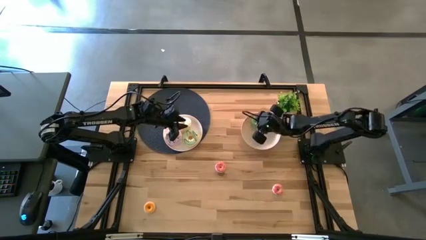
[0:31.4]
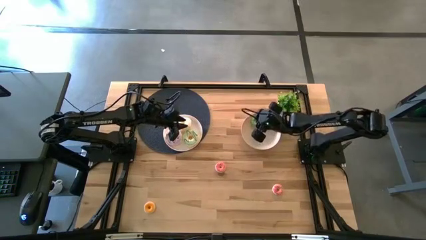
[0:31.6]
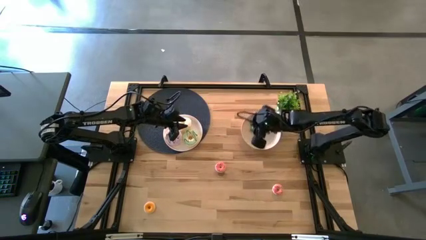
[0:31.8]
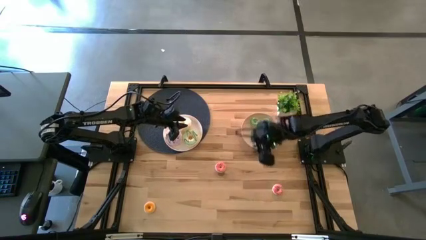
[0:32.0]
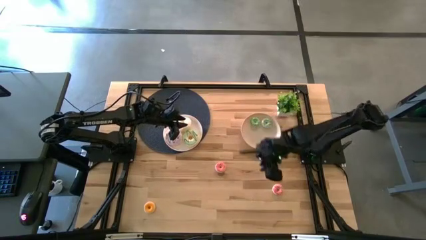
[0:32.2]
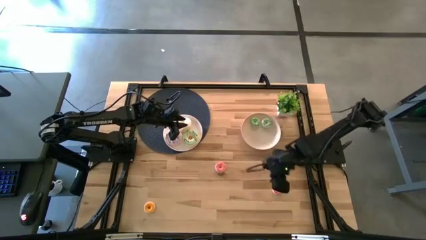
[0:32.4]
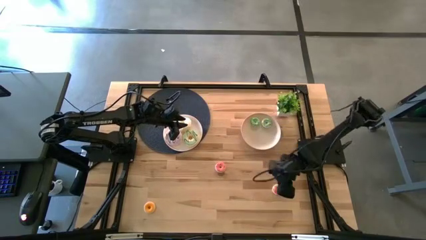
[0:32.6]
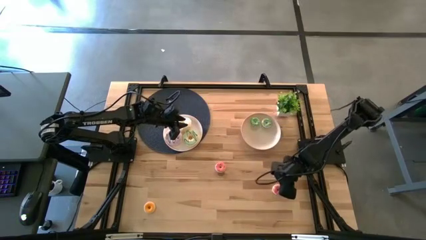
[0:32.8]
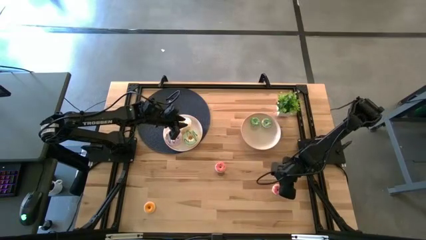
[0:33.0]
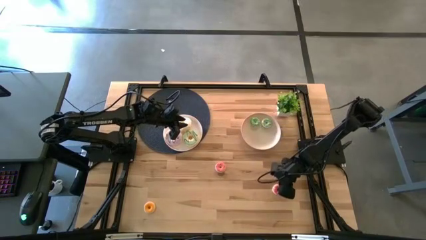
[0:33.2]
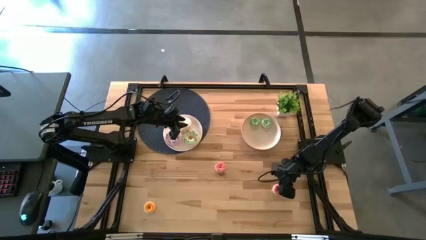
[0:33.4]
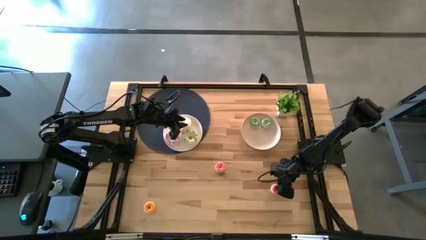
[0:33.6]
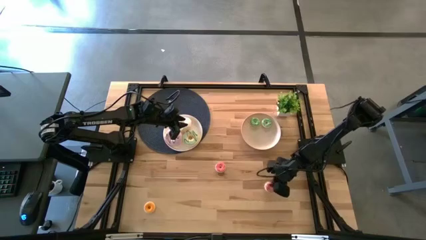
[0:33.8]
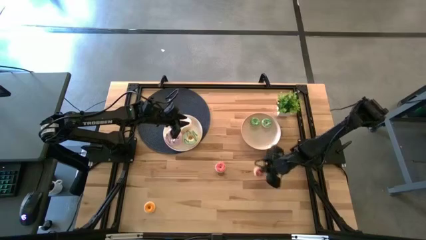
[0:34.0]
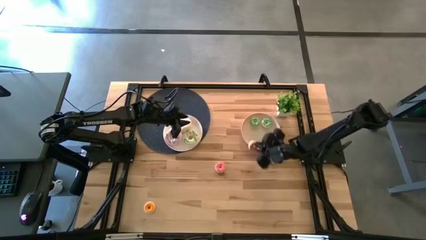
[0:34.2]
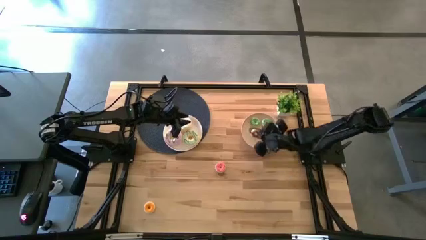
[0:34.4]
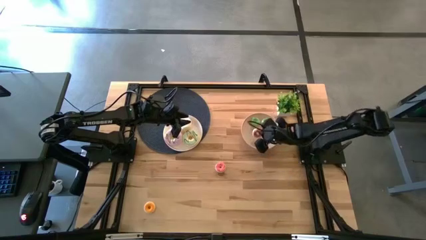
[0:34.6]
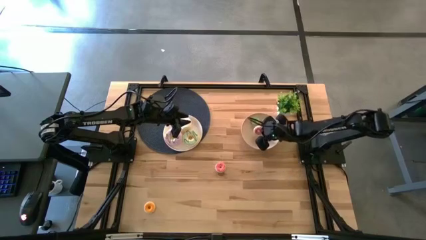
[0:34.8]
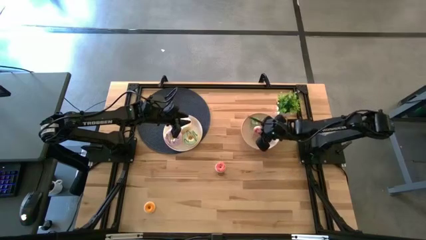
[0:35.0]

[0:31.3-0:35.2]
Task: Pick & Place donuts
Put the right small pink donut on the right white plate

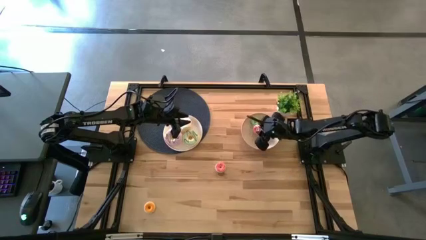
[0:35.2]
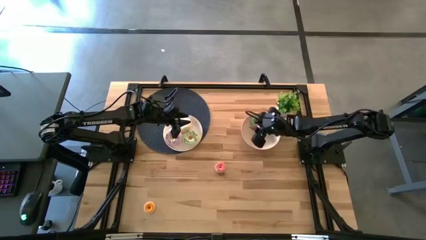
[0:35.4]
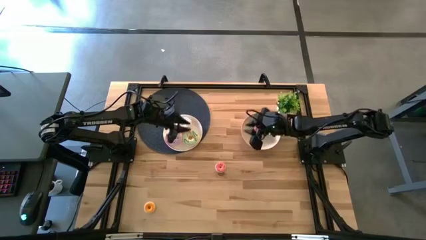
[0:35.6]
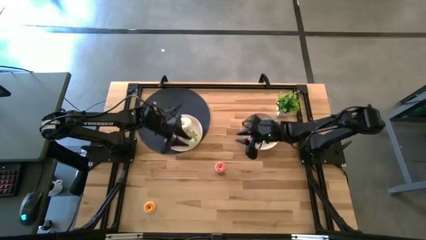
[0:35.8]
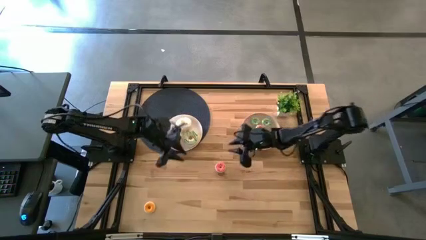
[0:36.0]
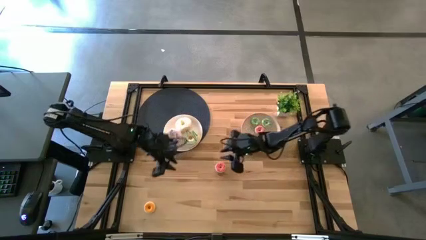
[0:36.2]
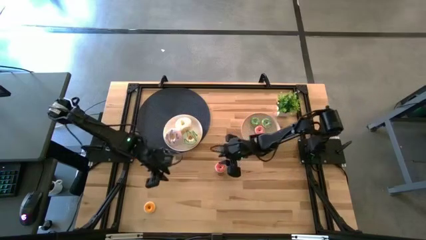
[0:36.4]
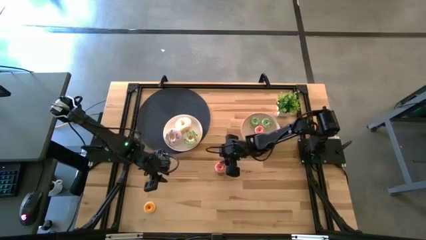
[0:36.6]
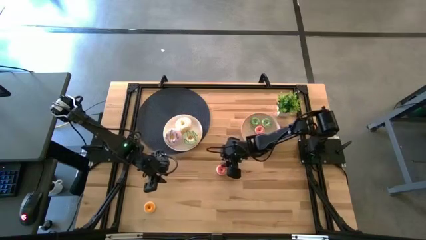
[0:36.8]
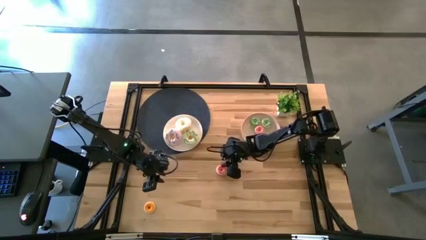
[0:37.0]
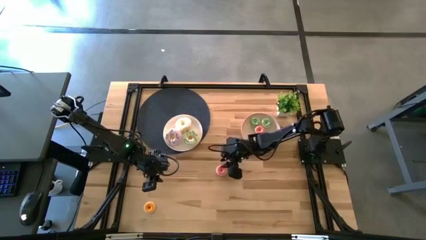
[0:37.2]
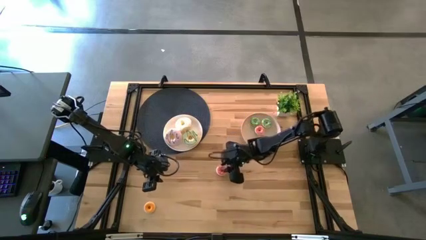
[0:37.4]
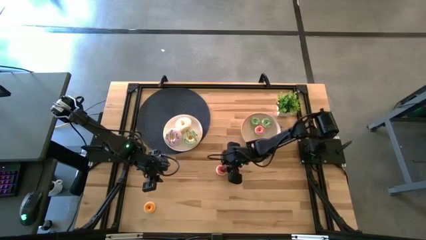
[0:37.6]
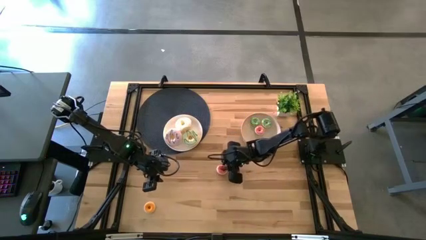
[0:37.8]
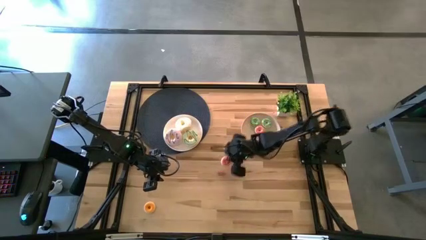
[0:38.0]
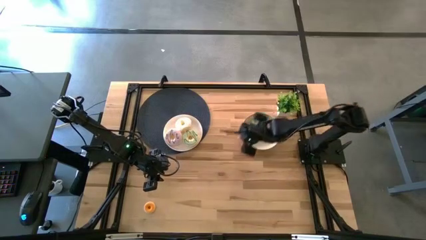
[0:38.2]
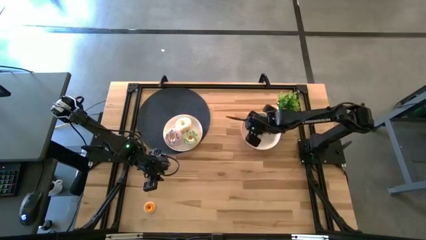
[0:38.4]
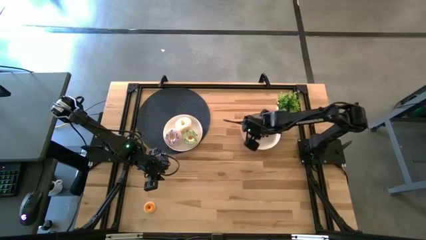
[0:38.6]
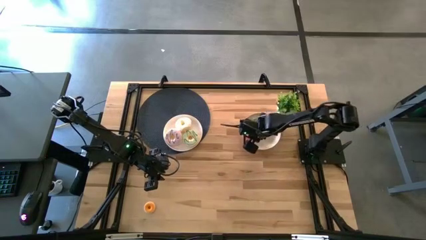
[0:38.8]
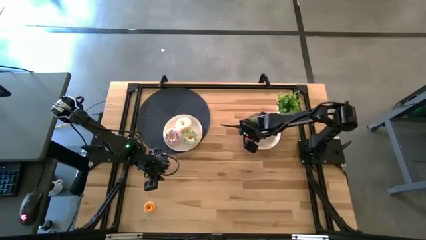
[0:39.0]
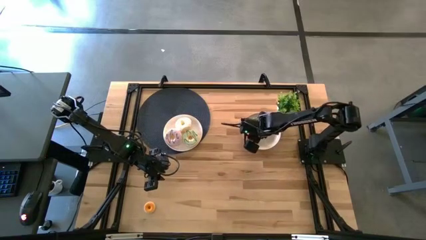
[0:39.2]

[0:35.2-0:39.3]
Put the small pink donut on the right white plate

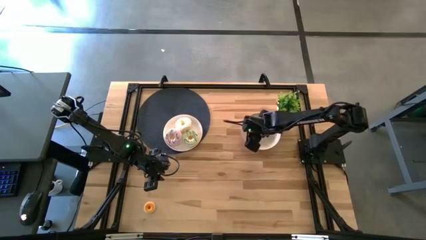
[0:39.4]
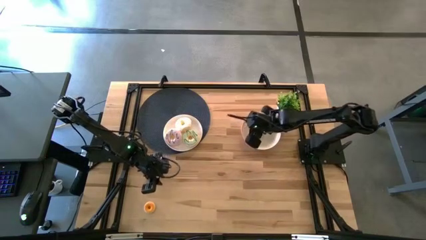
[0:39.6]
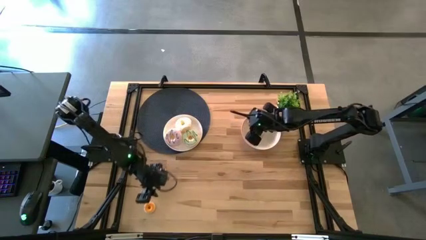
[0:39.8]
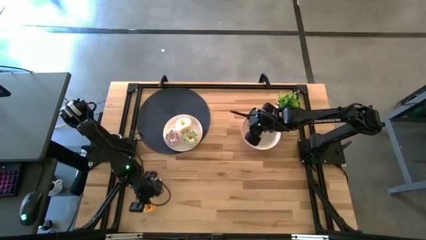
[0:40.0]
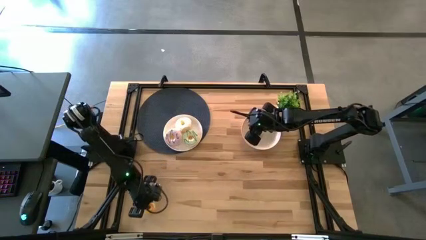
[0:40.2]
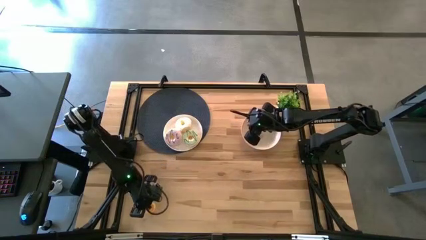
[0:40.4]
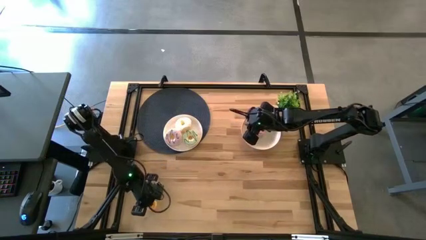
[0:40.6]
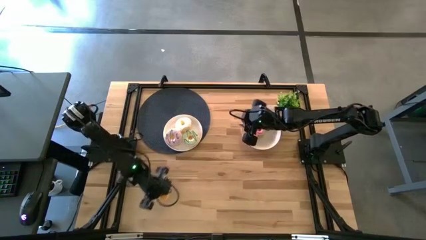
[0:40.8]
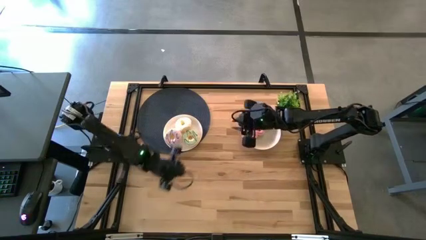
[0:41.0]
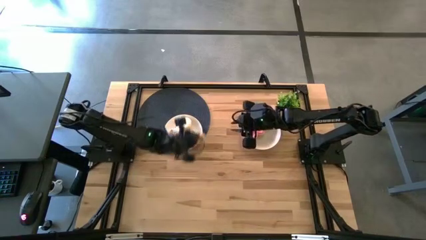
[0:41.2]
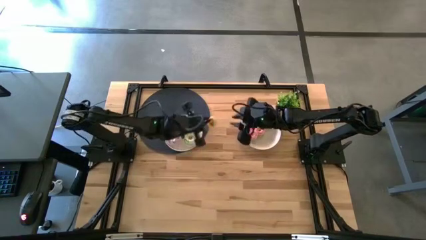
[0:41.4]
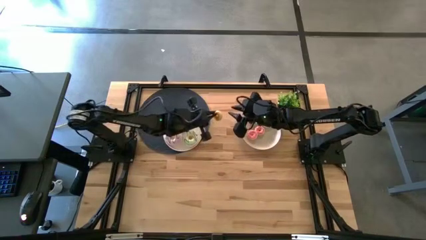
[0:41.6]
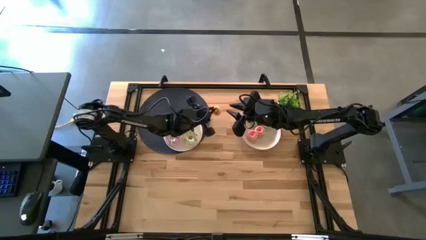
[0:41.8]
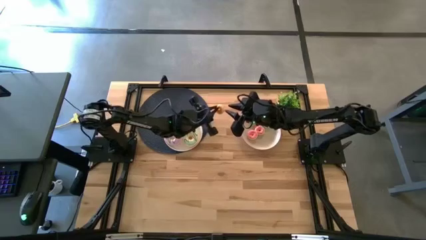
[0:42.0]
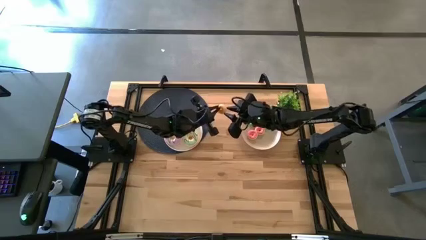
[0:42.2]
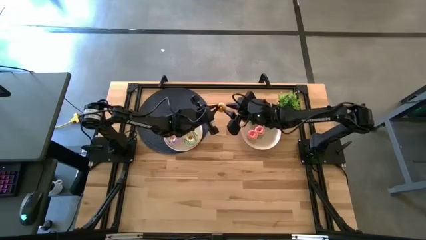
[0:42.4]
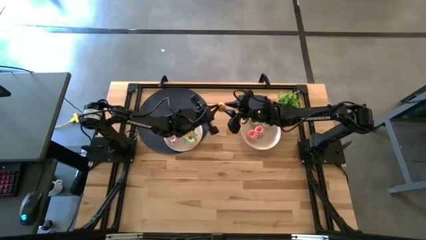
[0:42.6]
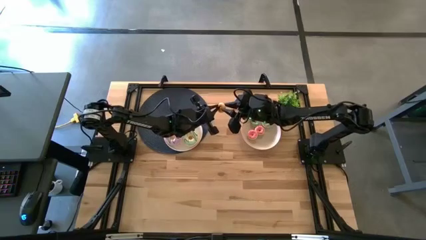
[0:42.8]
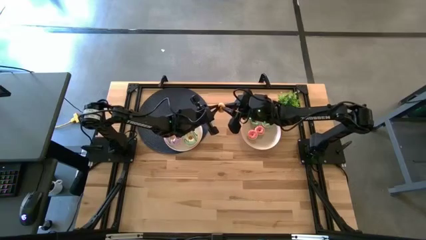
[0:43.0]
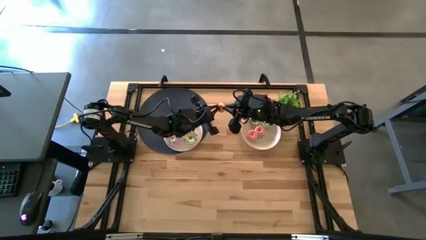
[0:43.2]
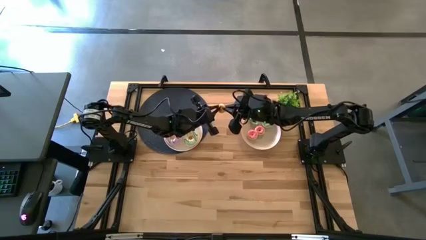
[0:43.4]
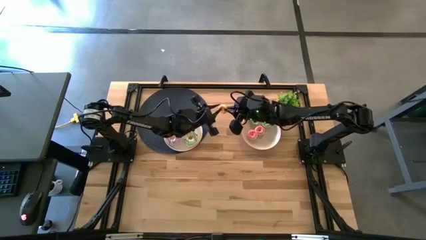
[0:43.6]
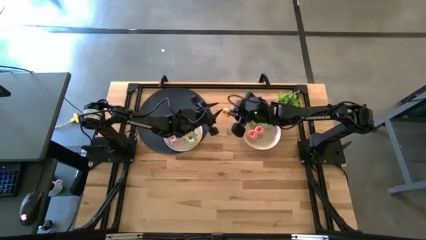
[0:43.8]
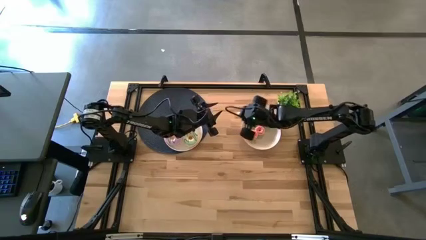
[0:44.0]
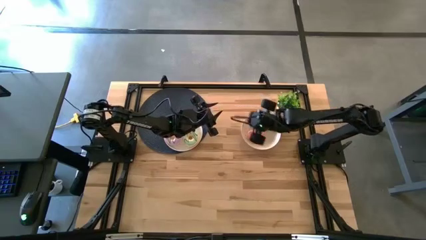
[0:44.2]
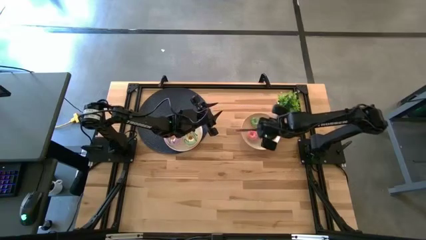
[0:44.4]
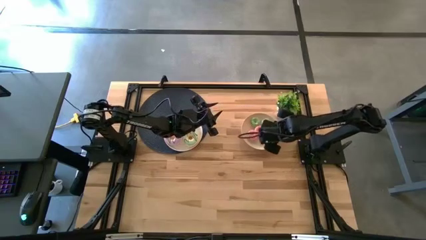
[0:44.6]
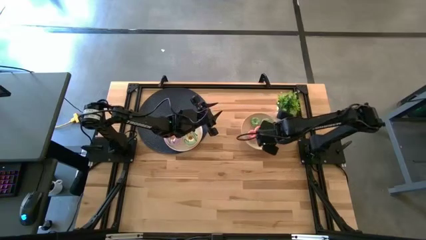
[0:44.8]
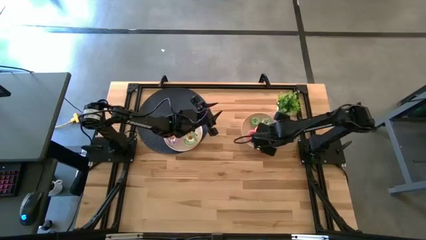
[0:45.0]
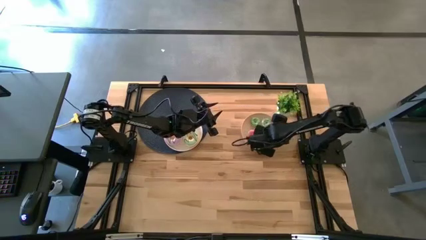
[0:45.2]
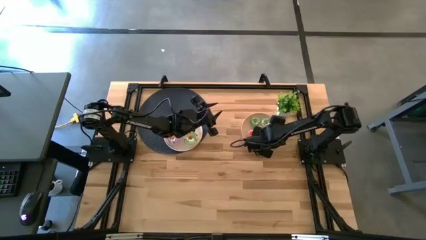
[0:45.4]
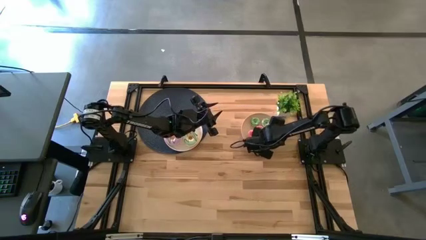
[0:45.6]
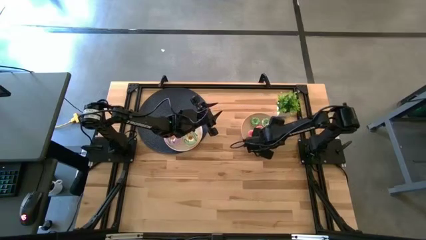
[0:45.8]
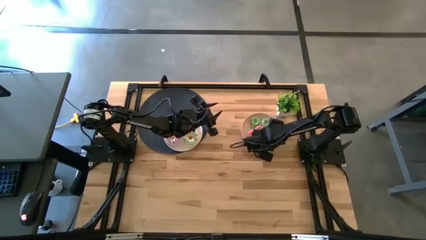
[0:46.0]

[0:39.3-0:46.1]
Put the small yellow donut on the right white plate
